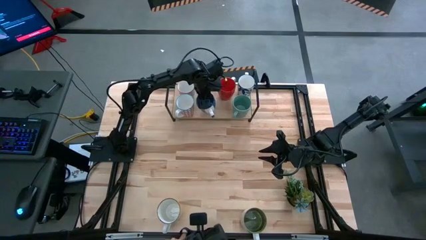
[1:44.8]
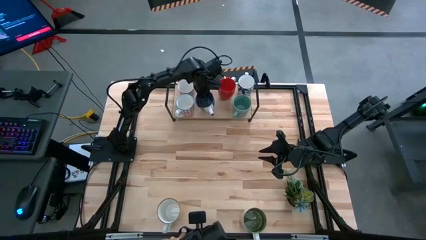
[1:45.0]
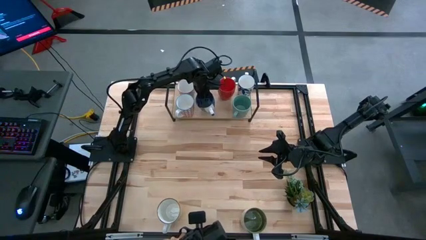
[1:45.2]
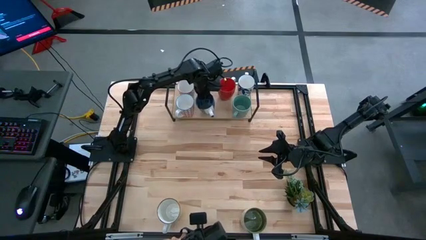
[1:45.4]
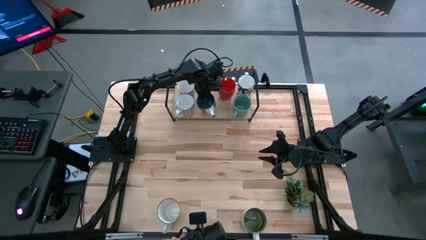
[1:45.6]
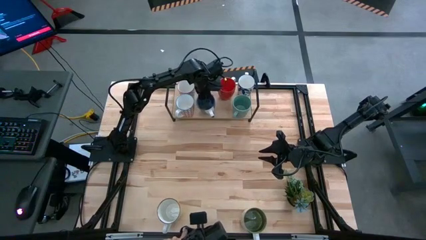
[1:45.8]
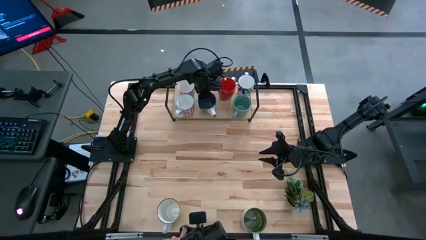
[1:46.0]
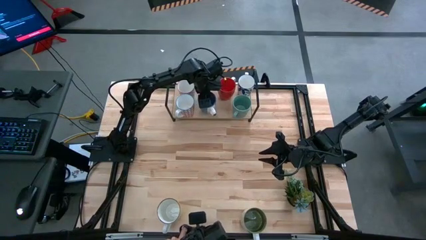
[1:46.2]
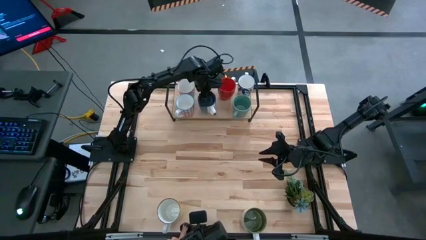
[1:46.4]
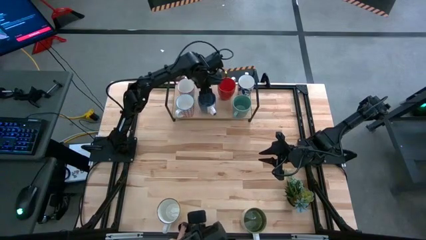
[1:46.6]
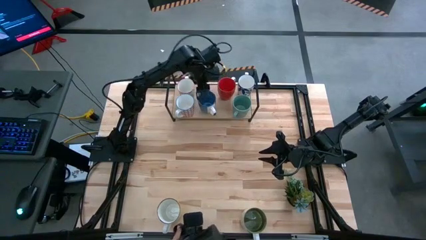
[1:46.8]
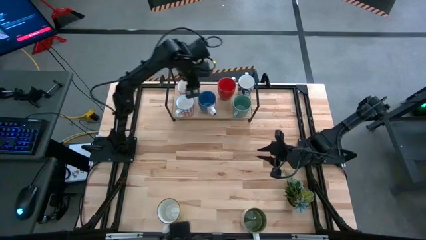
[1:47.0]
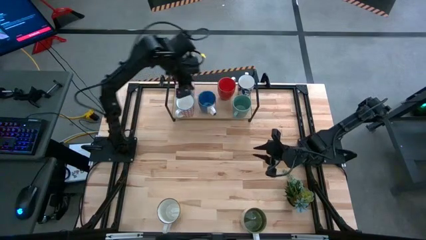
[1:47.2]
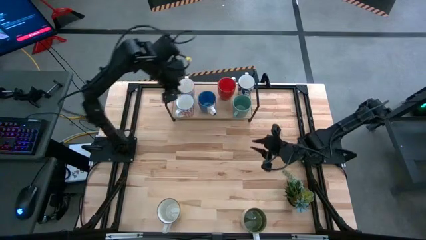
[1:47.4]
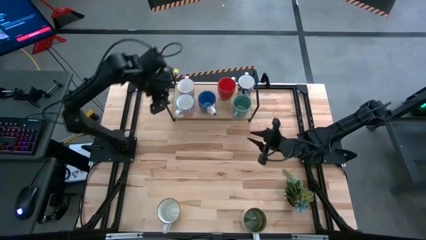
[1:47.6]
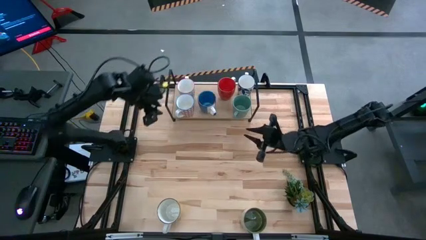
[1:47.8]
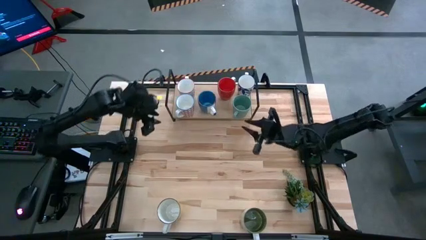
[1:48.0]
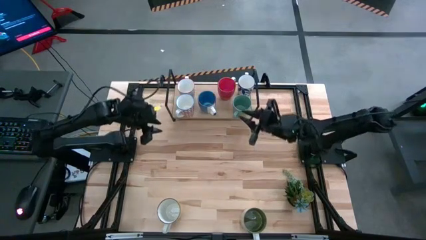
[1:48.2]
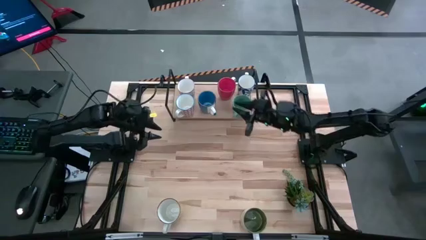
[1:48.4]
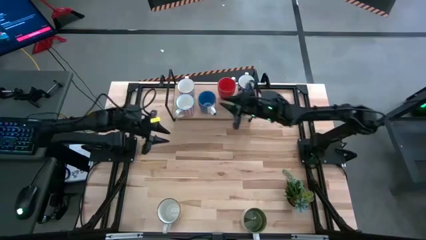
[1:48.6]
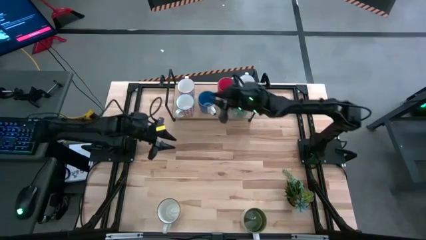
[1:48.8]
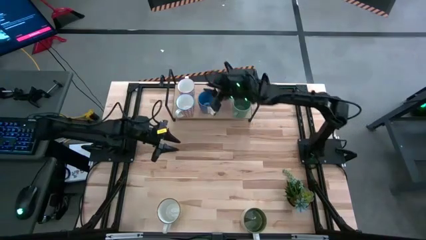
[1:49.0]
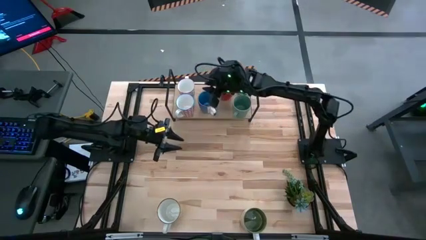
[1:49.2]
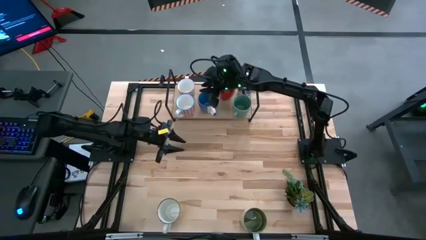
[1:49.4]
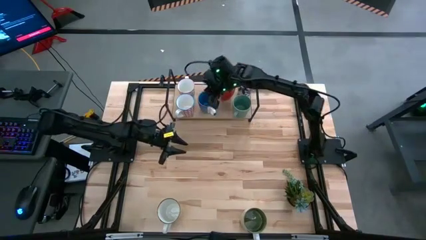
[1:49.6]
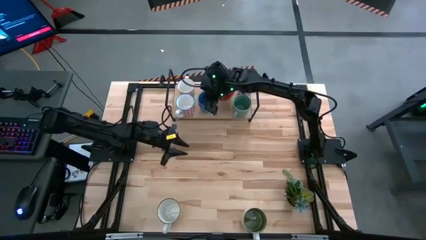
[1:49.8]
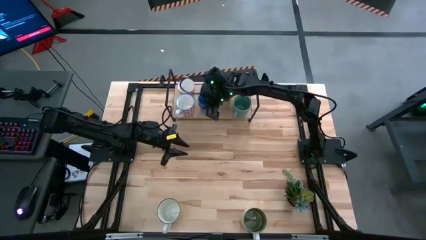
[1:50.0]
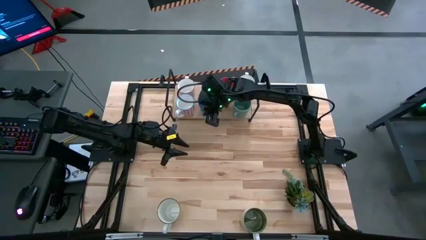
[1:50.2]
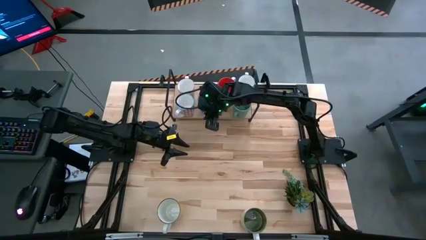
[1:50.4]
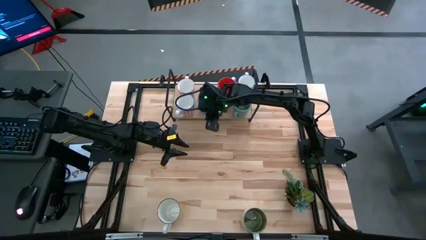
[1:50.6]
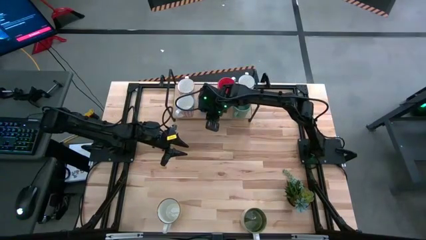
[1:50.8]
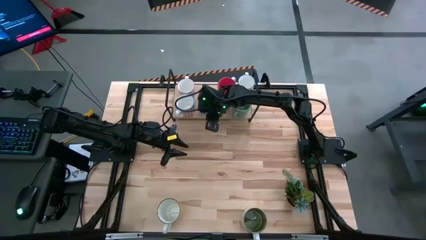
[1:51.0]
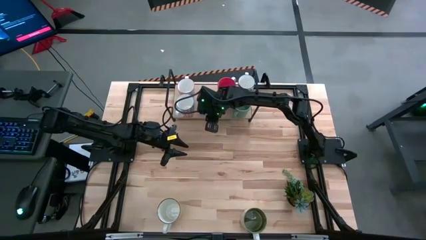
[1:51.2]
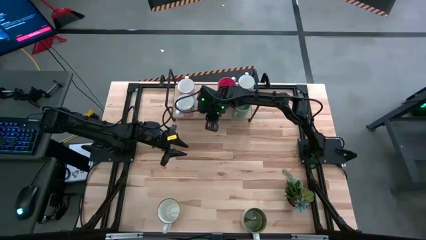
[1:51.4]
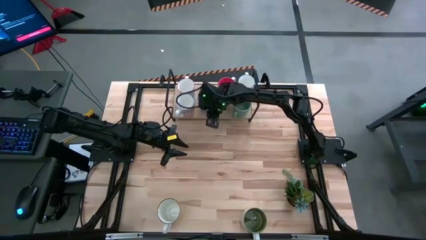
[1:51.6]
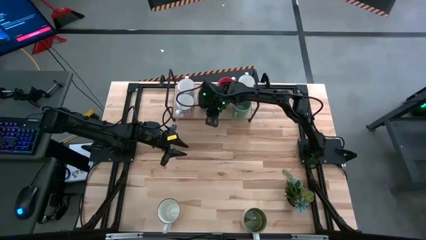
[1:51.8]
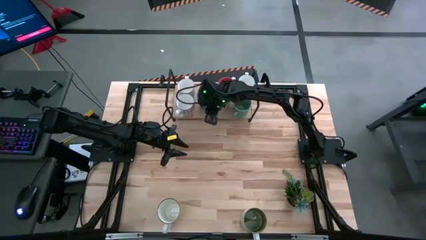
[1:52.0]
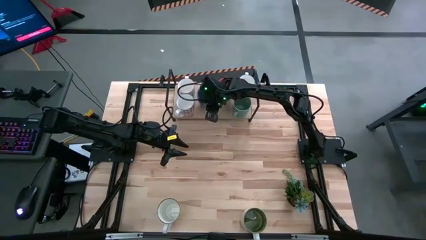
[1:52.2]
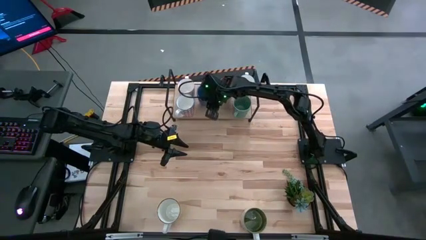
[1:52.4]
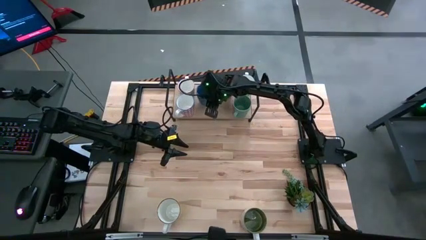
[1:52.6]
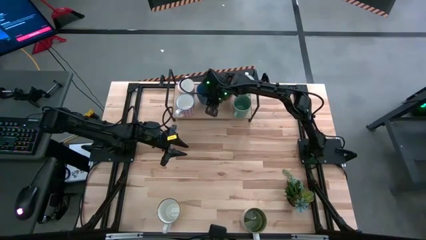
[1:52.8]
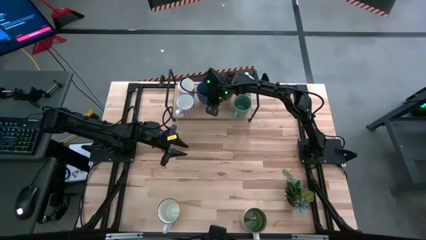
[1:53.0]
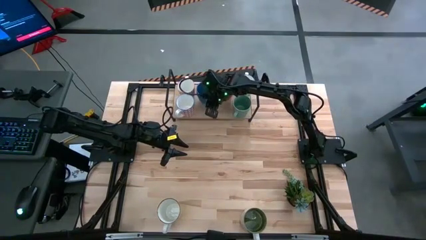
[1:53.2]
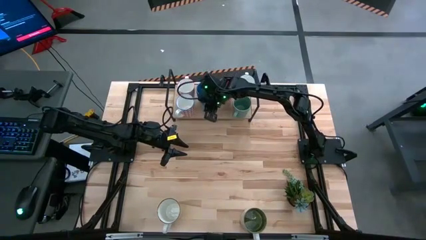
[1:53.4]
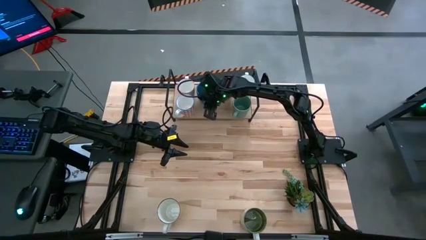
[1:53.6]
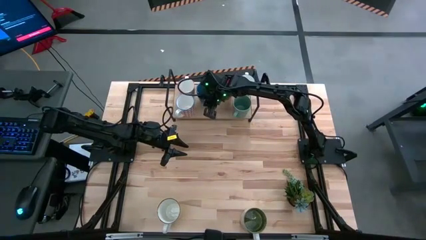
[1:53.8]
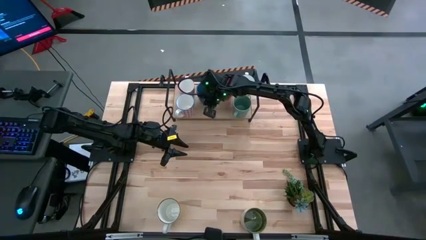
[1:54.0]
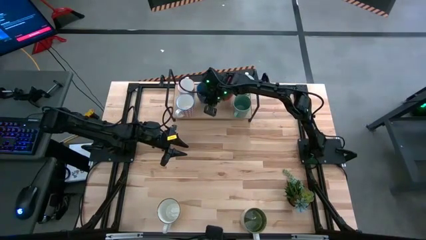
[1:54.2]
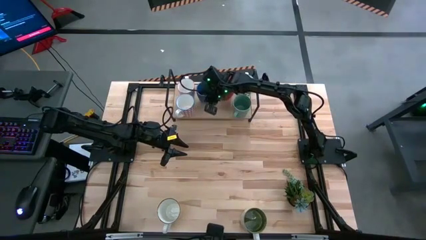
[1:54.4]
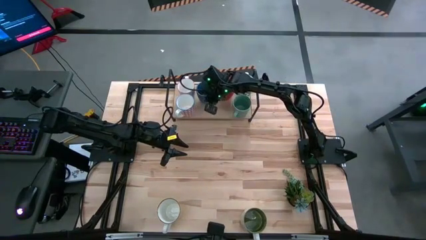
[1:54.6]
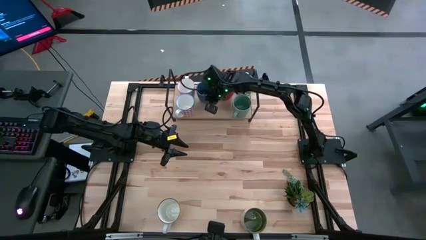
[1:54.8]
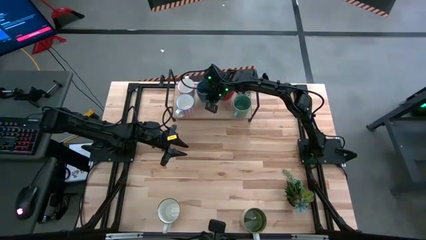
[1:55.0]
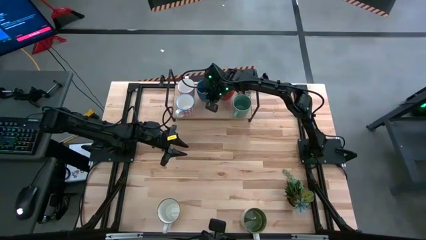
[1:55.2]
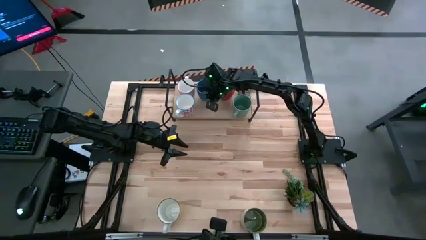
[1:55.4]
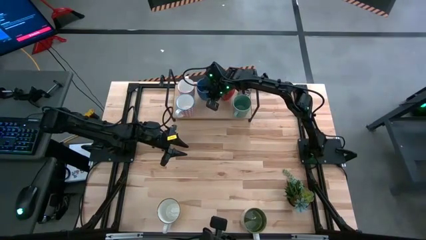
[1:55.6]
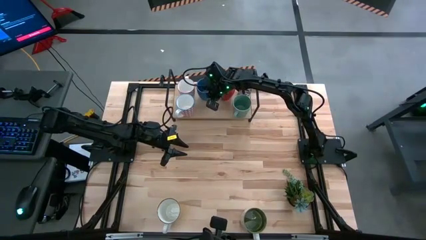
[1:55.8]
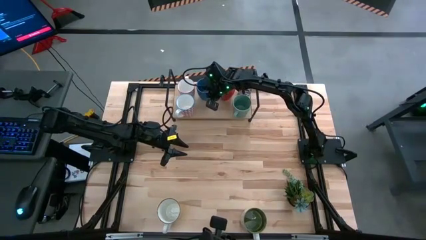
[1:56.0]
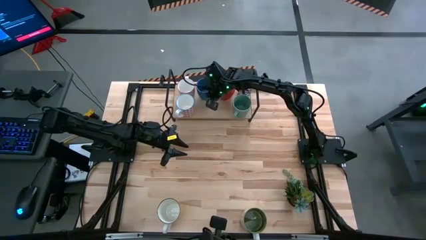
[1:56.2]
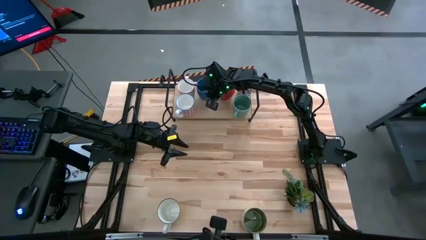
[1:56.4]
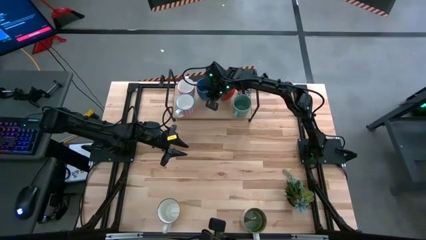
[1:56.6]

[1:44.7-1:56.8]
Task: Place coffee mugs
Put the blue mug on the shelf
